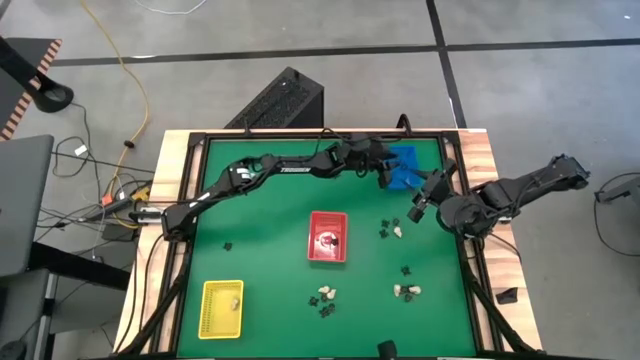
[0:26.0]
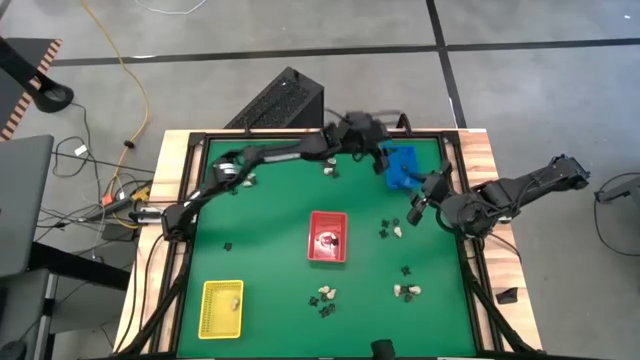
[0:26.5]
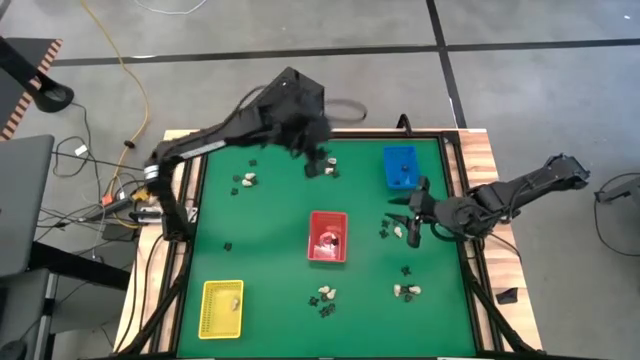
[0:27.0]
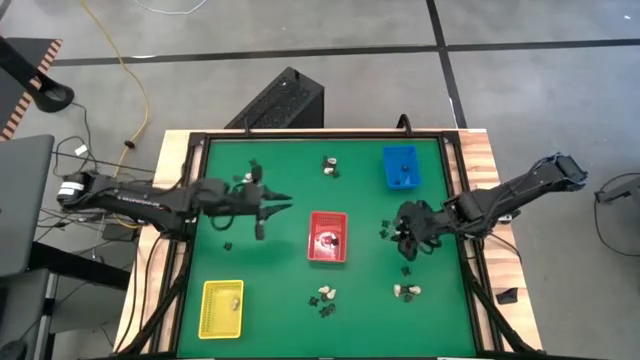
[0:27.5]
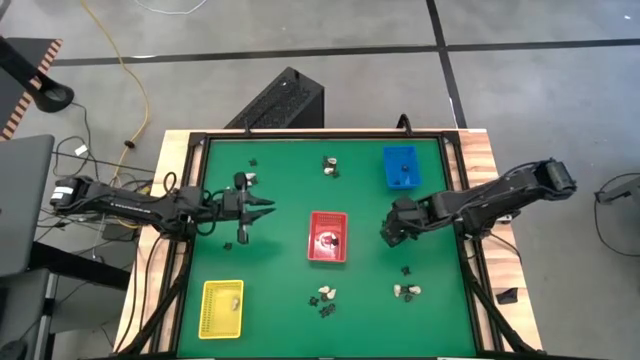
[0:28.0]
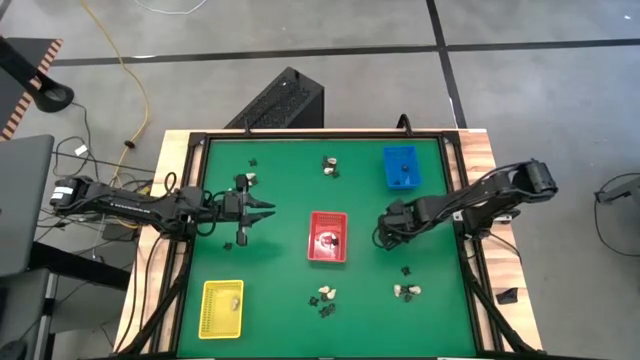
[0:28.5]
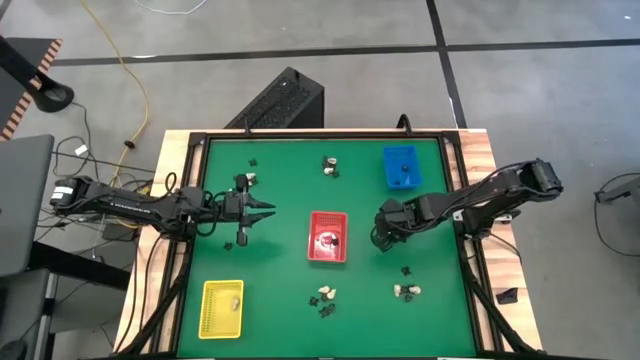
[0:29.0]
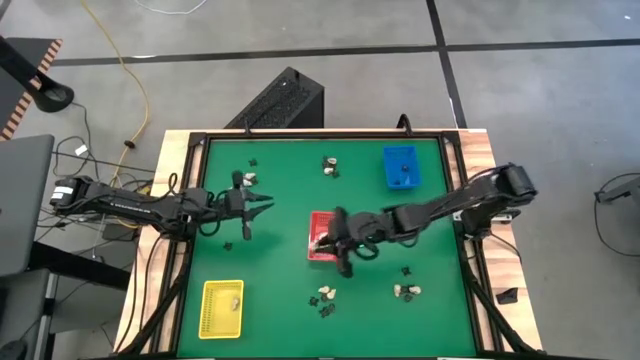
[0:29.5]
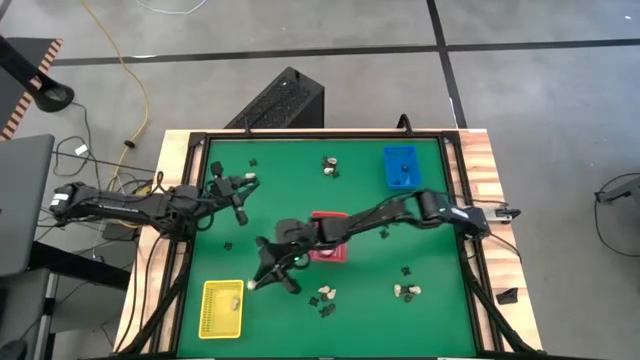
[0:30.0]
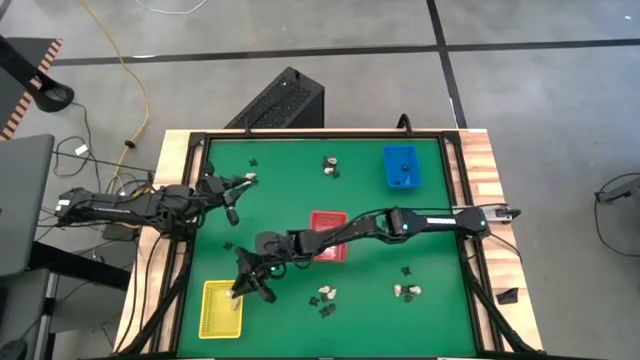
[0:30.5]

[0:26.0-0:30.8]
Task: Sort Halloween decoration
Put the white skull toy into the yellow bin

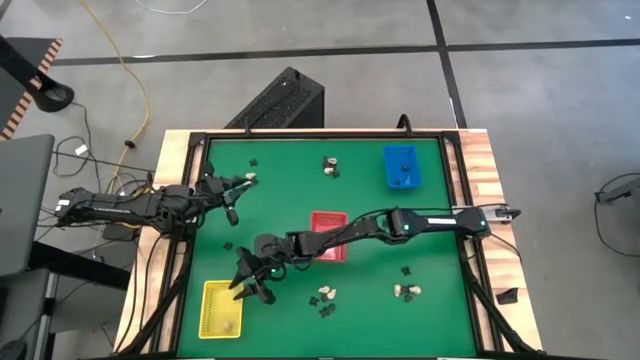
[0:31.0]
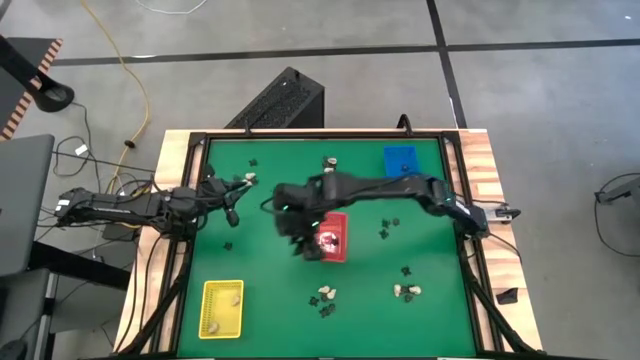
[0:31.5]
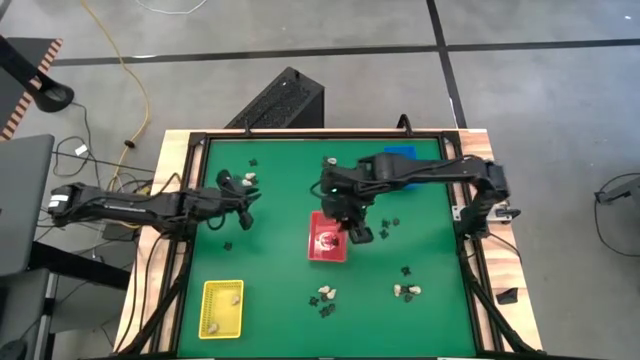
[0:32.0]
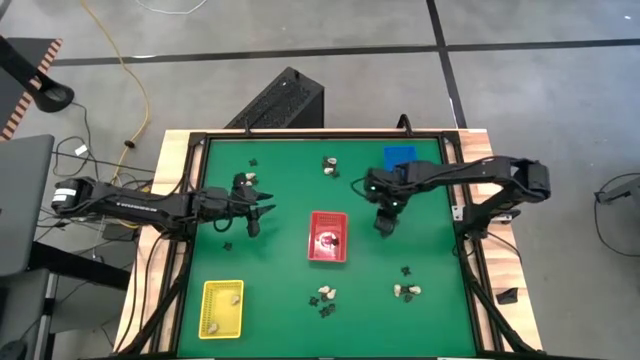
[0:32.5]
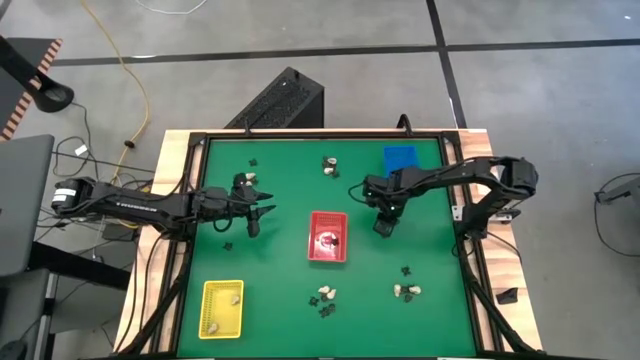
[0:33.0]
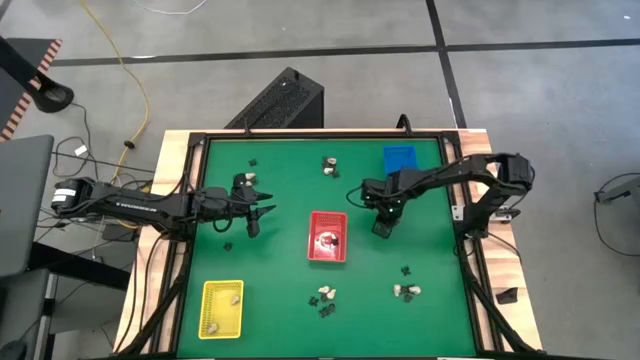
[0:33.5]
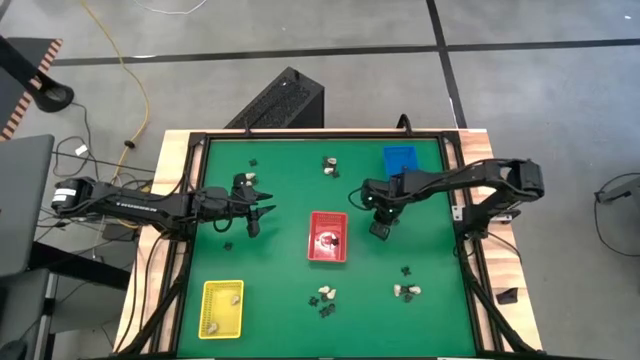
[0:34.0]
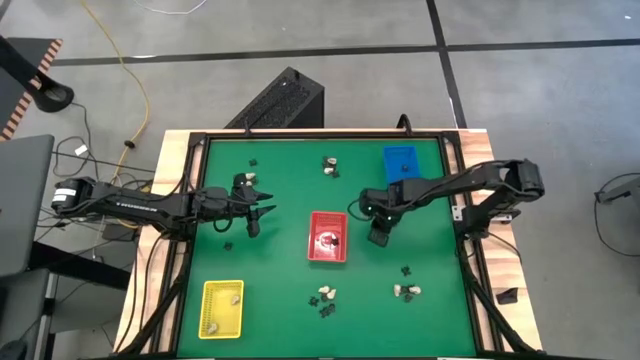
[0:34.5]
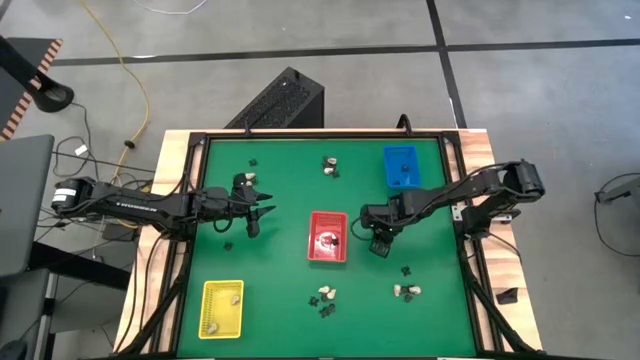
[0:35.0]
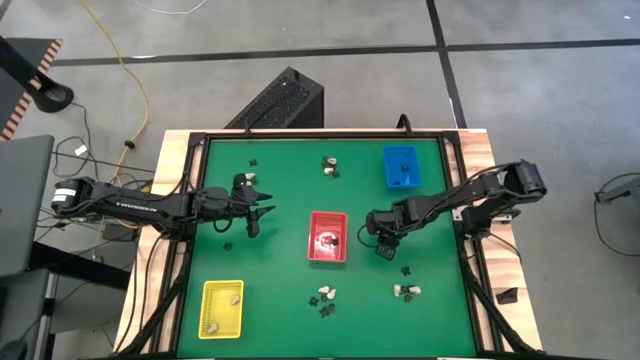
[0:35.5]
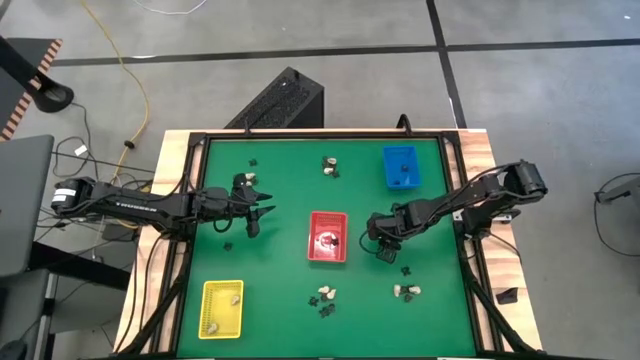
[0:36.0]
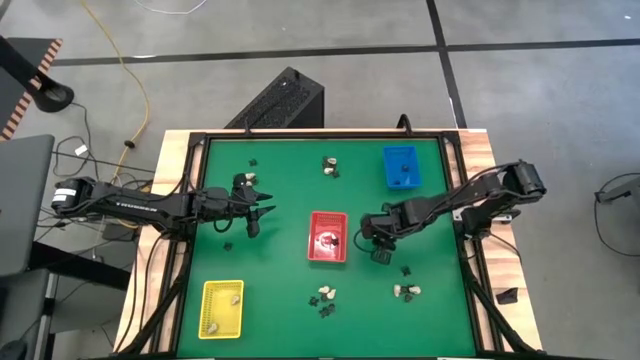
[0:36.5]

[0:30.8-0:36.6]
Put the black spider toy into the red bin

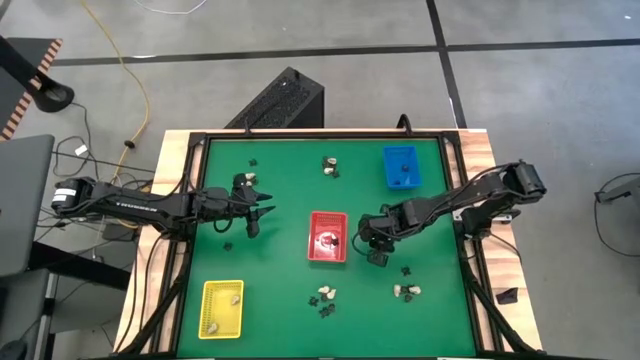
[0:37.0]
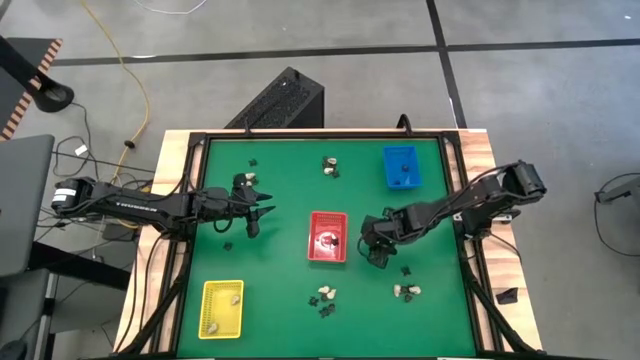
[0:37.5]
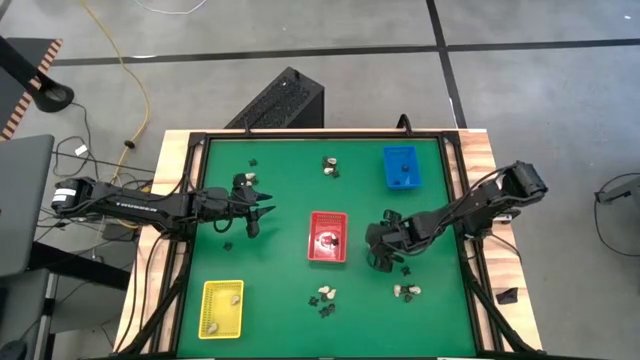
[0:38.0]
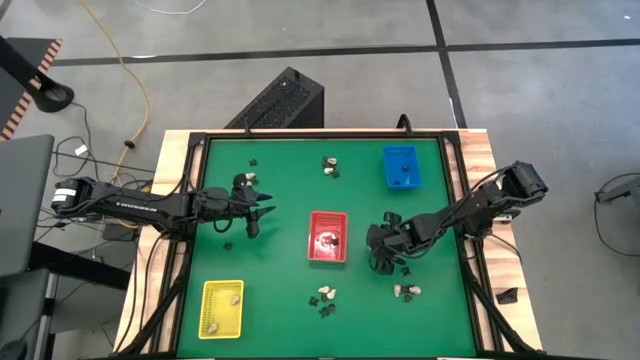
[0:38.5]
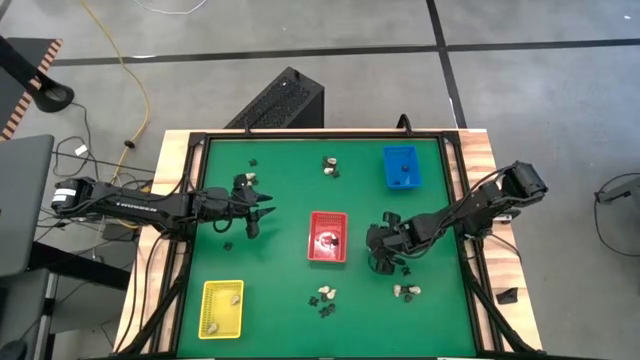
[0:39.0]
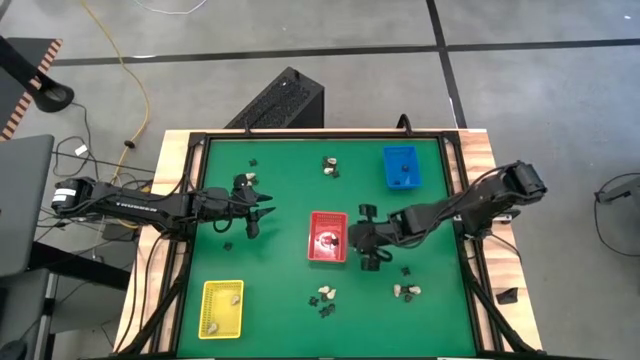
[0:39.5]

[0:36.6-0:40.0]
Put the small black spider toy into the red bin

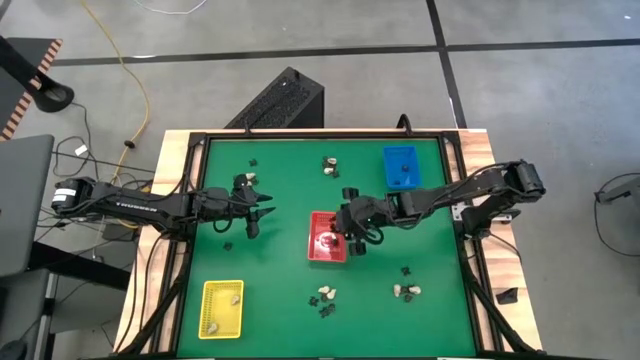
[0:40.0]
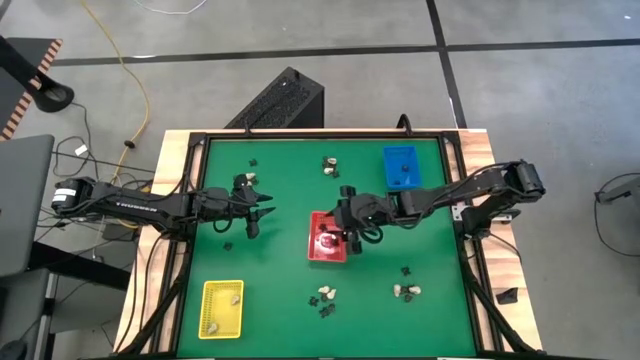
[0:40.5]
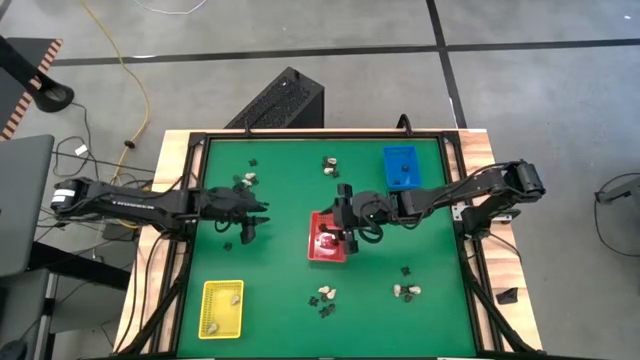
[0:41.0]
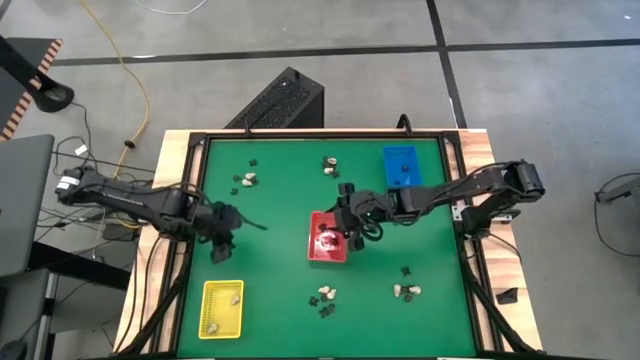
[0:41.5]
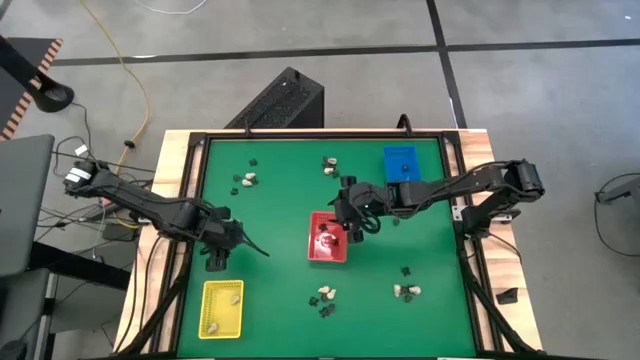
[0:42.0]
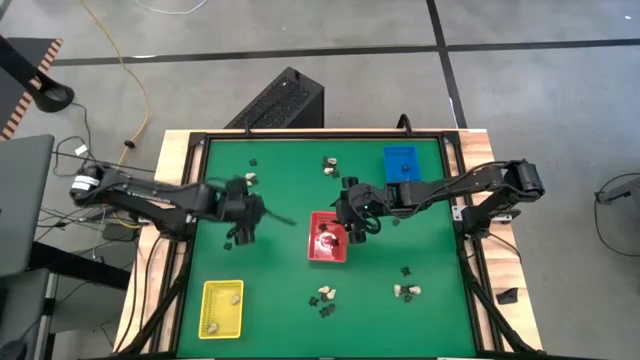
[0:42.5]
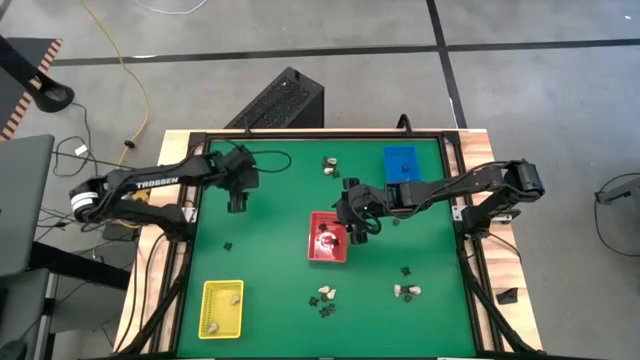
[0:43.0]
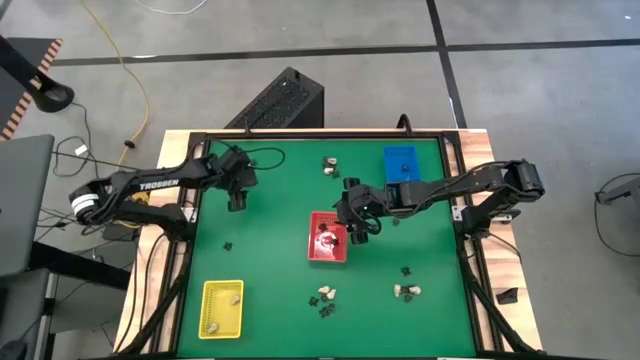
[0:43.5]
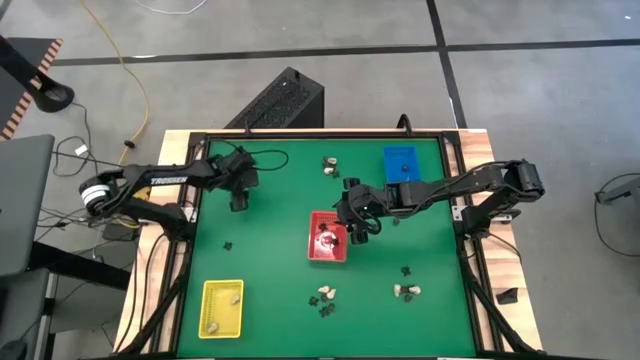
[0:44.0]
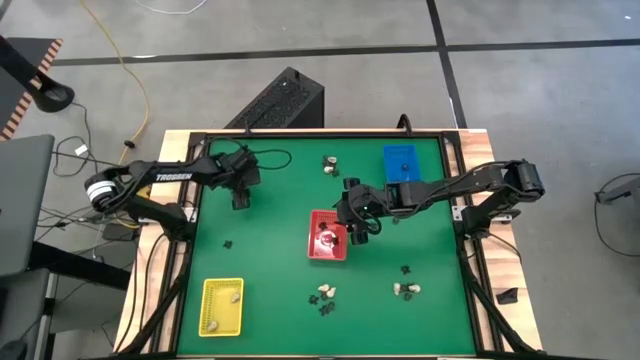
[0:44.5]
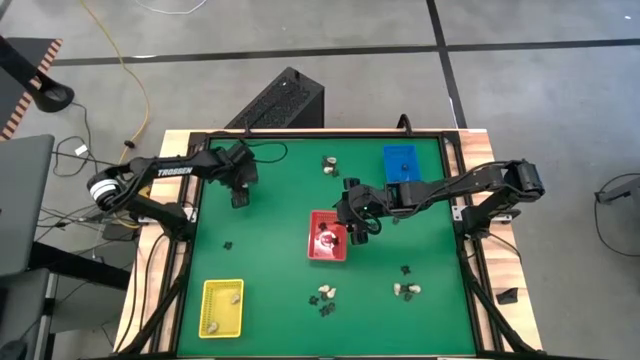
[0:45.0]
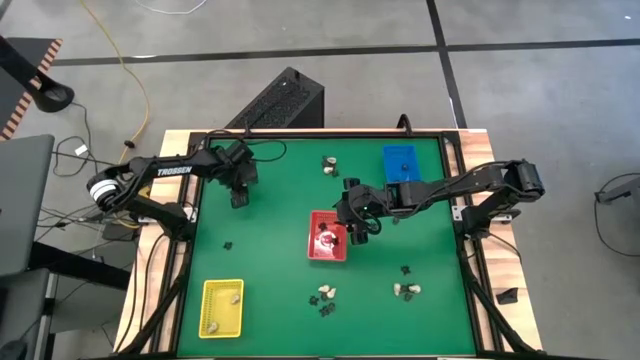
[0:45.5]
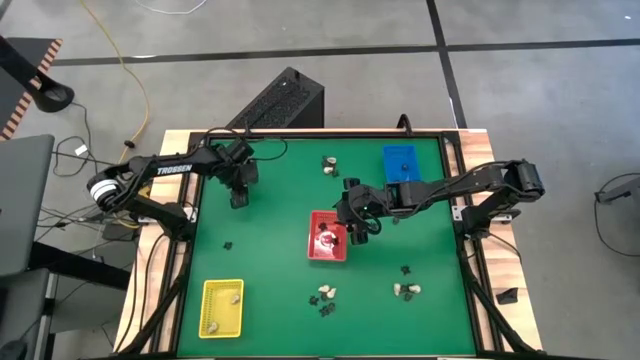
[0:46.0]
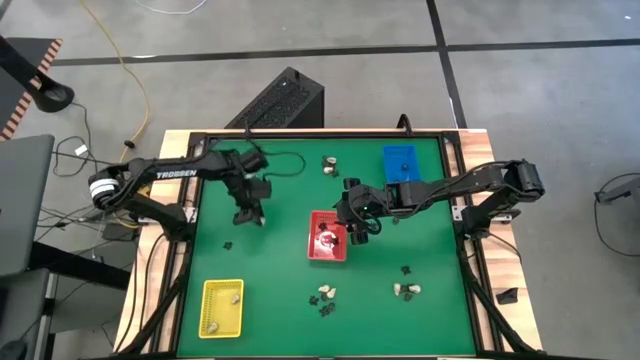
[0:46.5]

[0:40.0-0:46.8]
Put the white skull toy into the yellow bin
